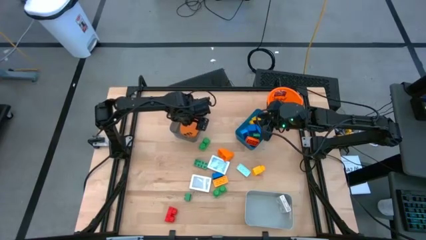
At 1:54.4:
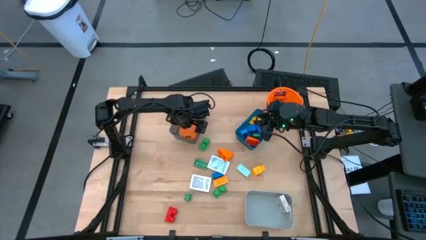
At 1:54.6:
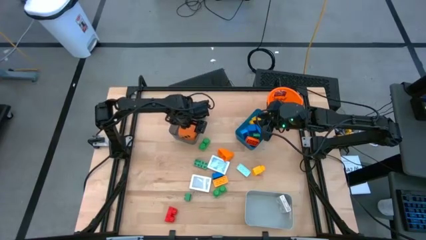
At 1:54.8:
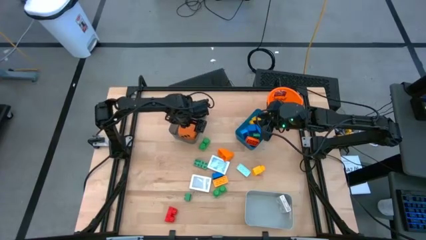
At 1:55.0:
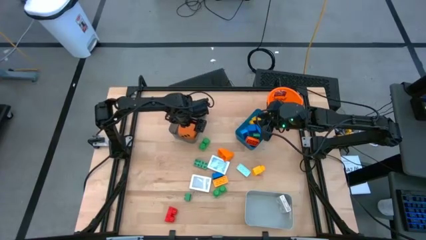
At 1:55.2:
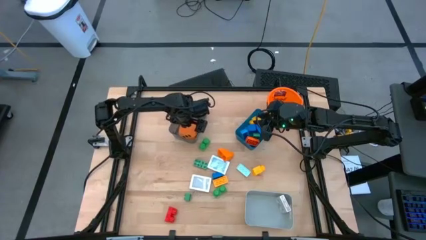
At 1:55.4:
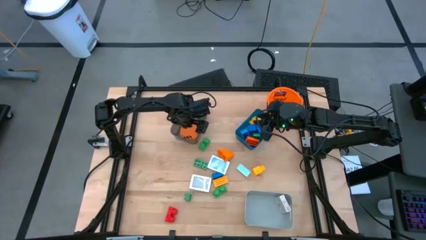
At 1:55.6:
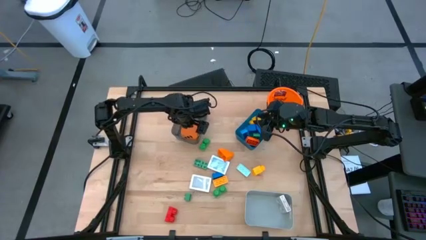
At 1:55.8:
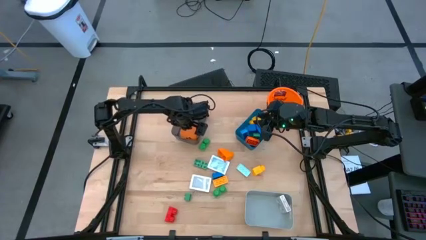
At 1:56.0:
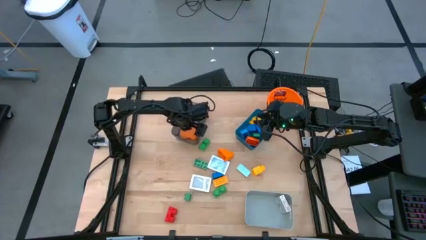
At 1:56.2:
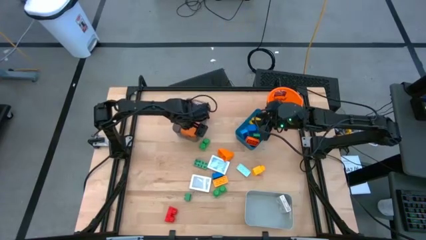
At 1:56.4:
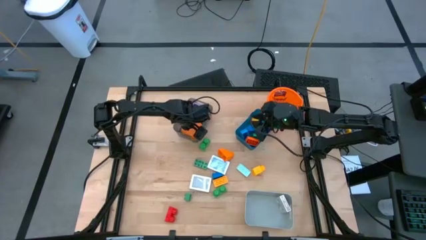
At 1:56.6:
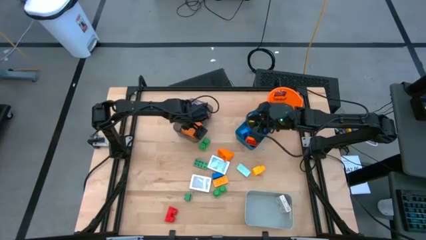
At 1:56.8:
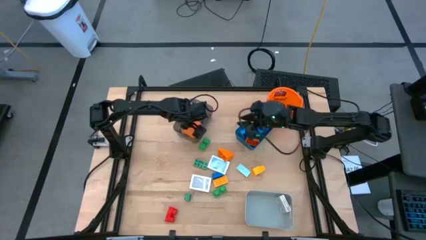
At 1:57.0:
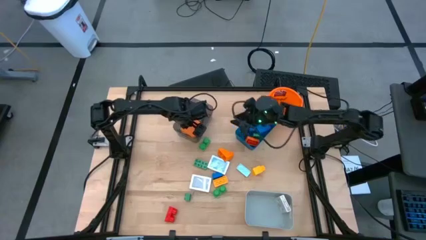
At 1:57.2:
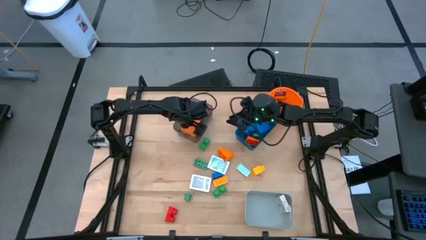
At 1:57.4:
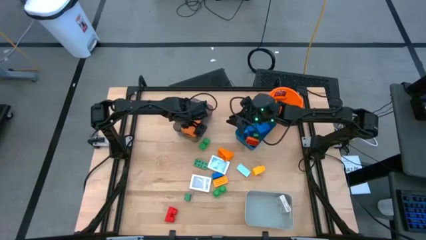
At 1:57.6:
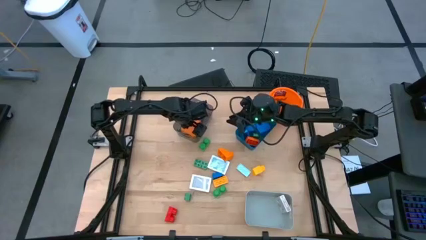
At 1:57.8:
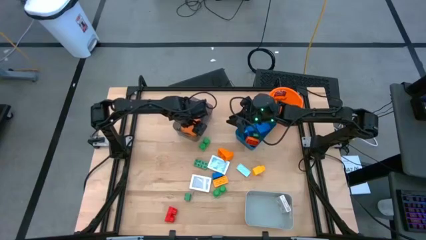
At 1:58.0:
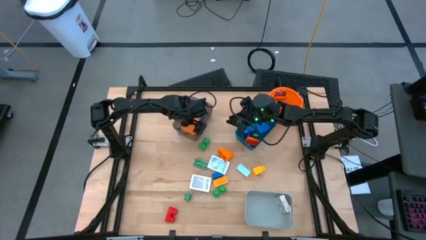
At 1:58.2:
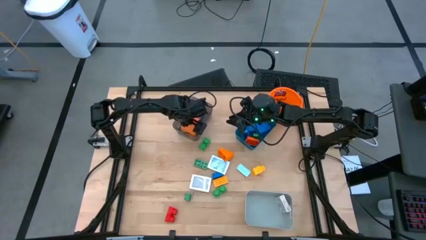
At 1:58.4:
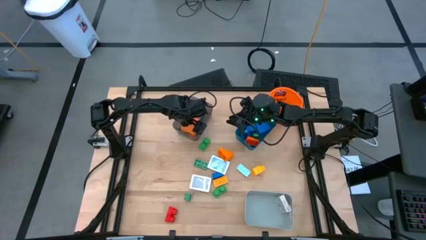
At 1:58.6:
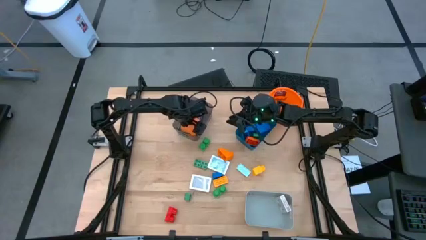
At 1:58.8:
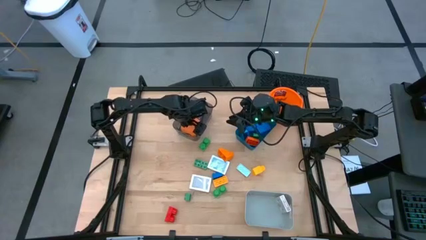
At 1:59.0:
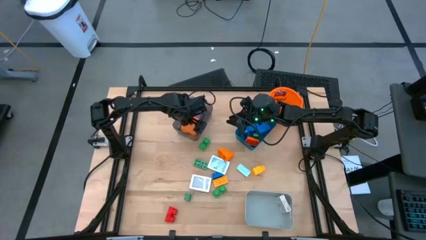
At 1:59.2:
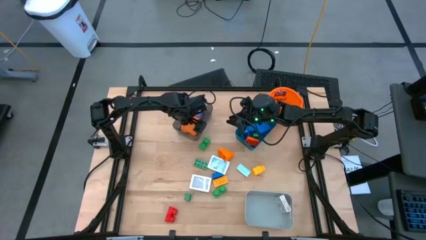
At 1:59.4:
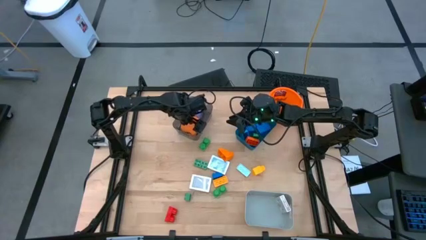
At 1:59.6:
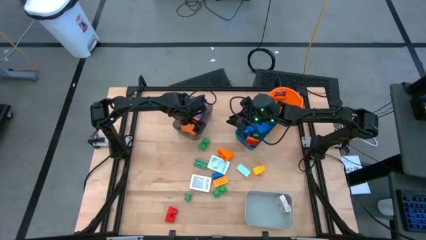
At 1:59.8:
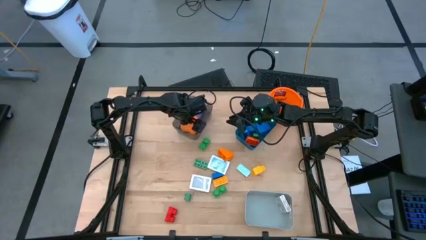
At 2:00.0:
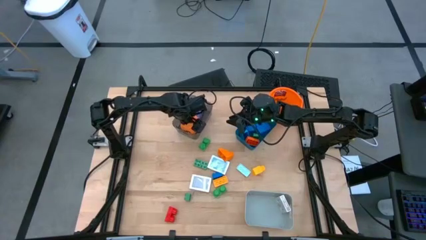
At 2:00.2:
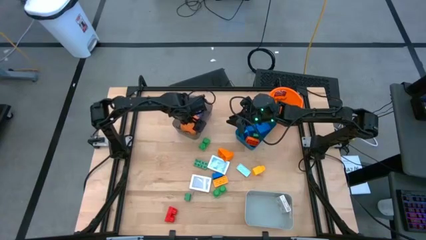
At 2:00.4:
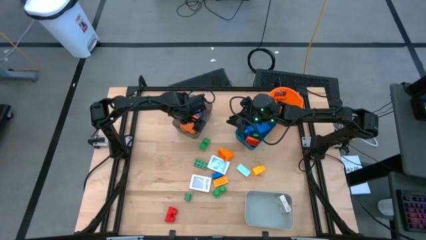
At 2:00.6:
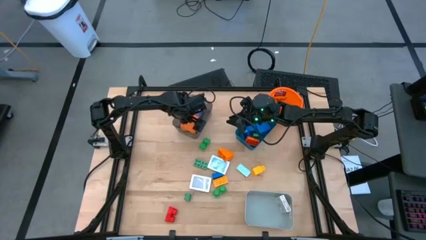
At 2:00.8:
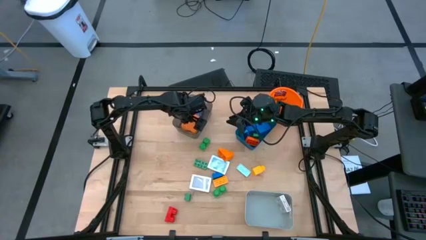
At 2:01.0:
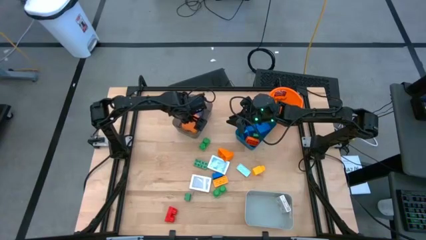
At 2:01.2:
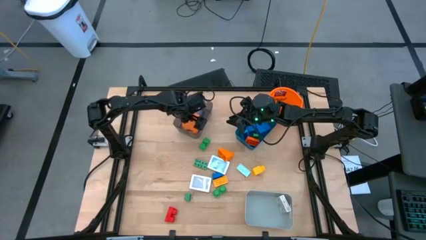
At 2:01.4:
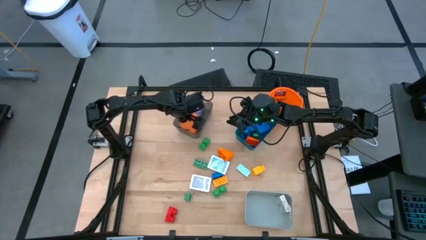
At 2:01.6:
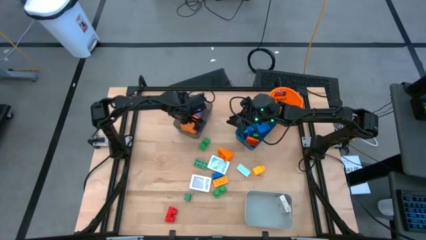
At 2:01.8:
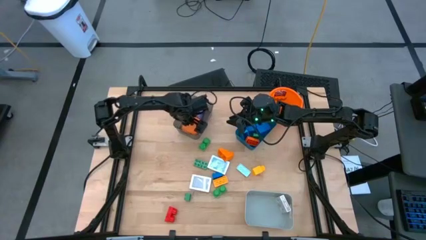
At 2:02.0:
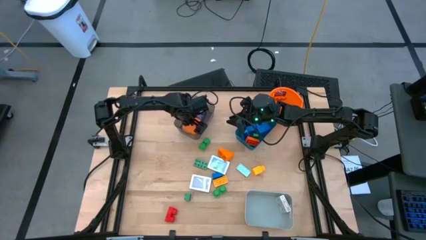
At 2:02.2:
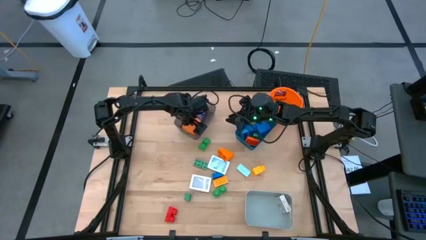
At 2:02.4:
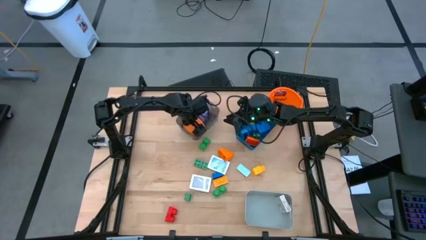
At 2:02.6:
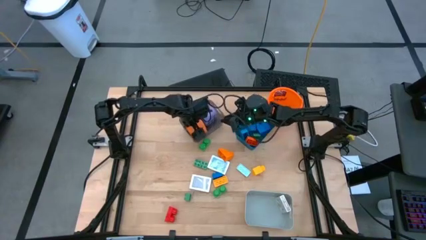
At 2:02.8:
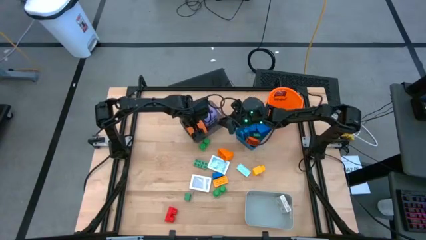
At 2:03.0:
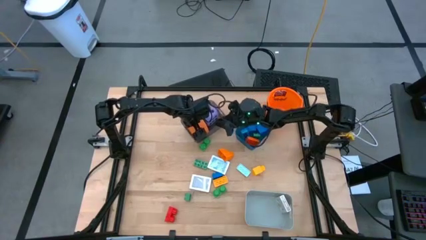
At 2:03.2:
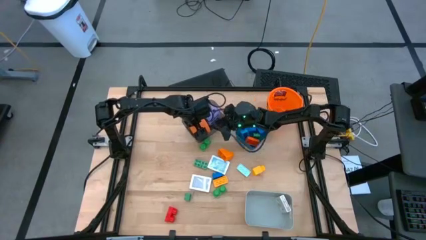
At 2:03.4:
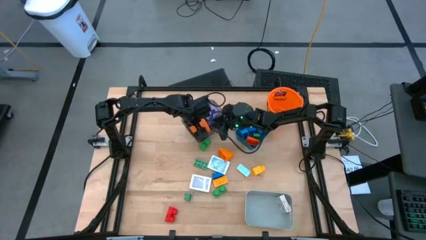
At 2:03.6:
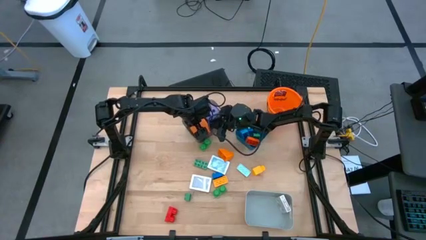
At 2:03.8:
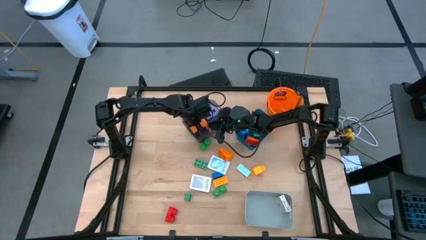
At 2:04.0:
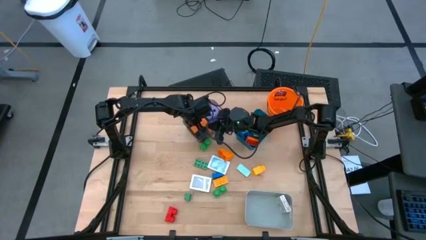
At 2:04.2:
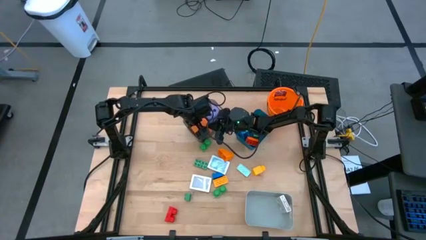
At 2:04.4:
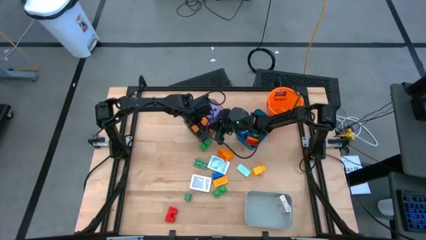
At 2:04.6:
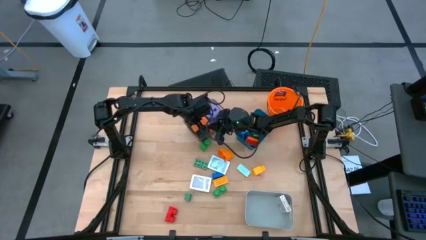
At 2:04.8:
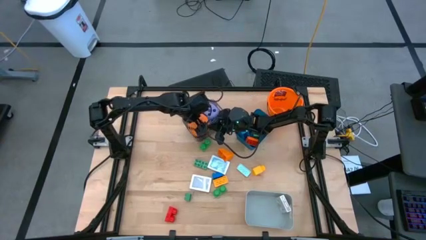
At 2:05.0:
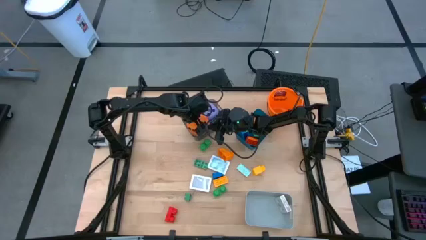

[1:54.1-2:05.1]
Task: Pick & Place Toys
Put the orange dice into the black bin

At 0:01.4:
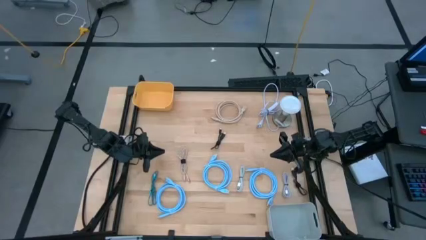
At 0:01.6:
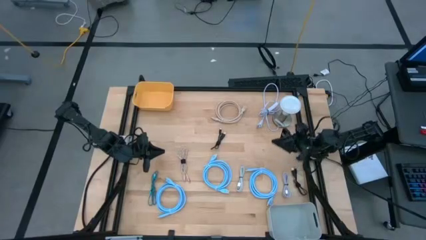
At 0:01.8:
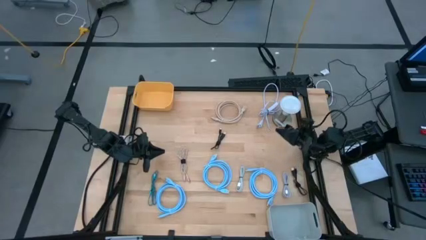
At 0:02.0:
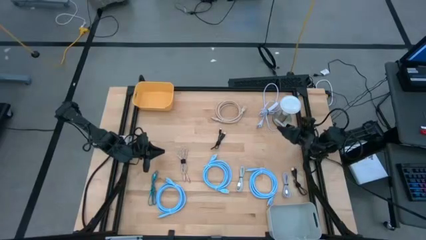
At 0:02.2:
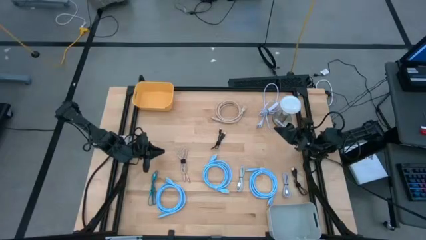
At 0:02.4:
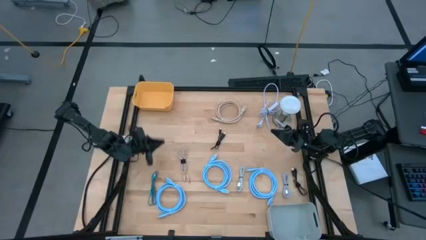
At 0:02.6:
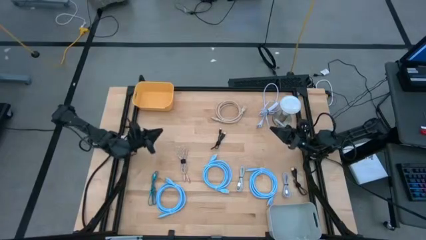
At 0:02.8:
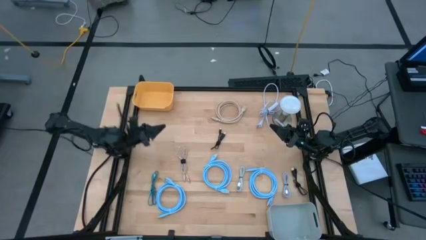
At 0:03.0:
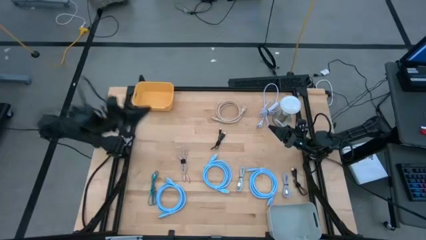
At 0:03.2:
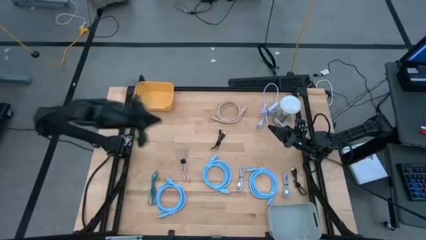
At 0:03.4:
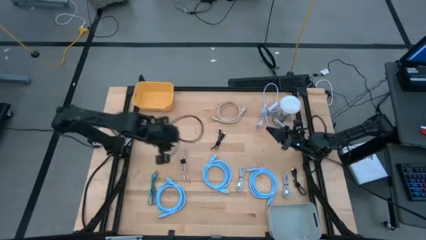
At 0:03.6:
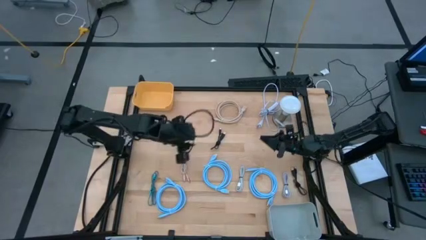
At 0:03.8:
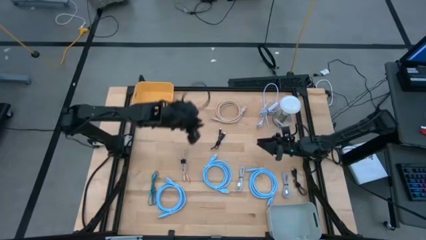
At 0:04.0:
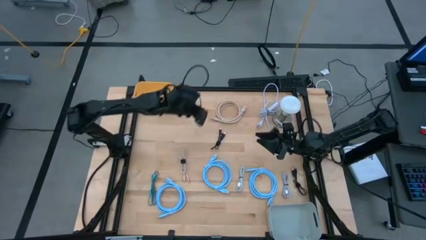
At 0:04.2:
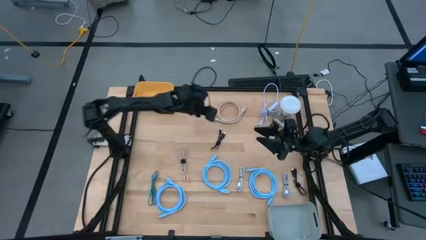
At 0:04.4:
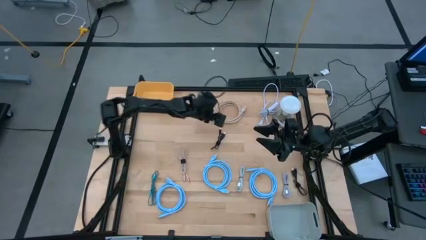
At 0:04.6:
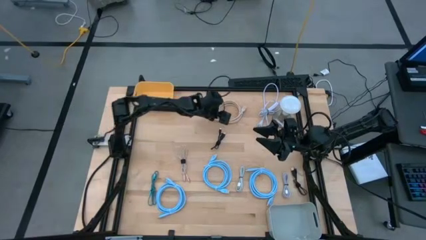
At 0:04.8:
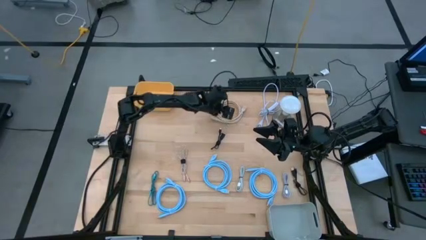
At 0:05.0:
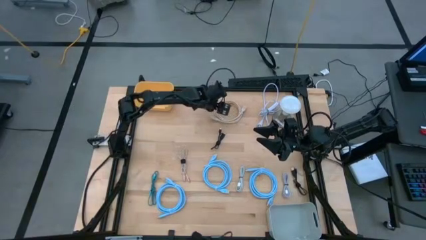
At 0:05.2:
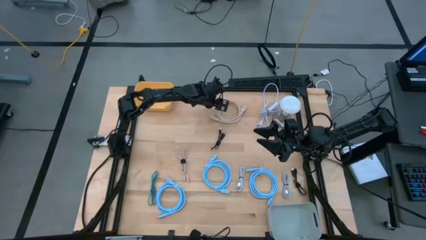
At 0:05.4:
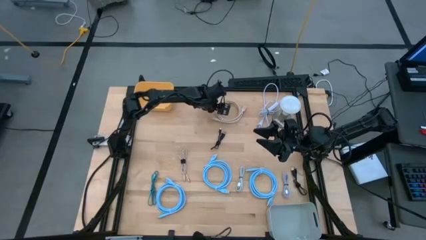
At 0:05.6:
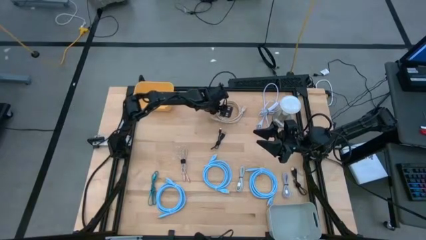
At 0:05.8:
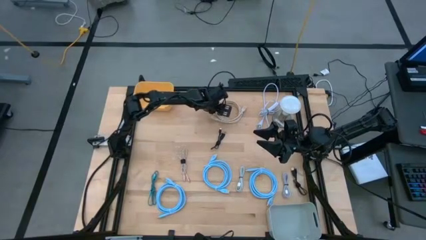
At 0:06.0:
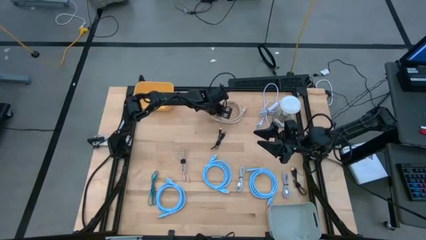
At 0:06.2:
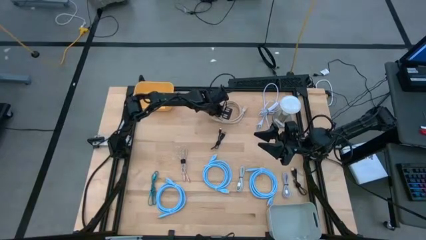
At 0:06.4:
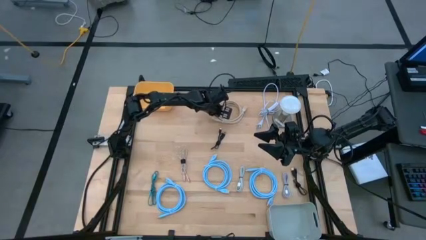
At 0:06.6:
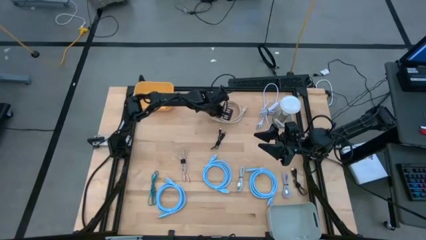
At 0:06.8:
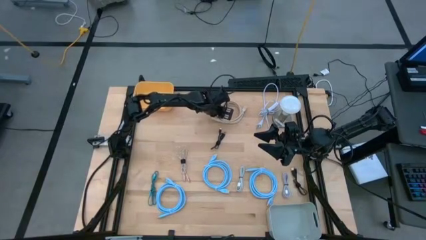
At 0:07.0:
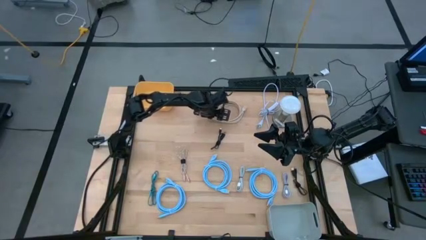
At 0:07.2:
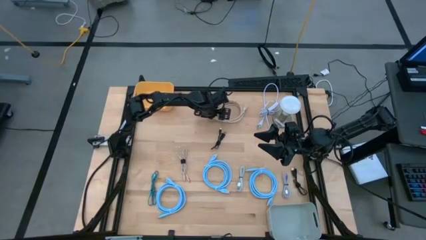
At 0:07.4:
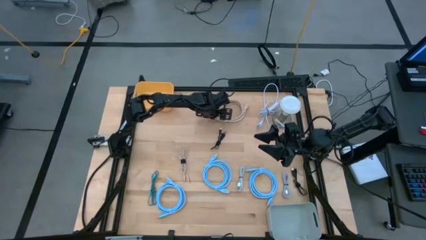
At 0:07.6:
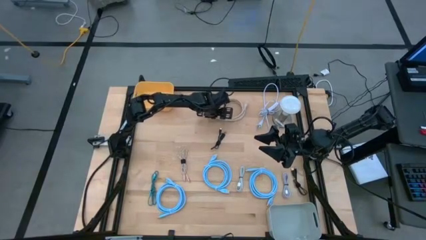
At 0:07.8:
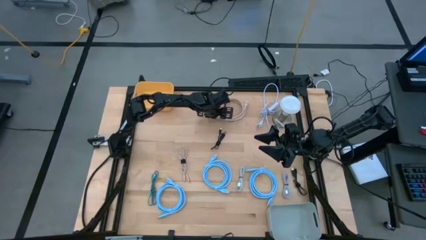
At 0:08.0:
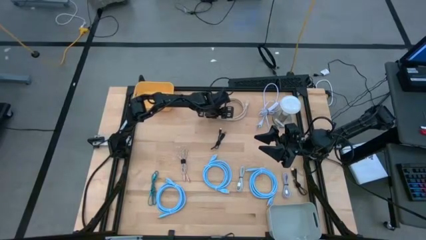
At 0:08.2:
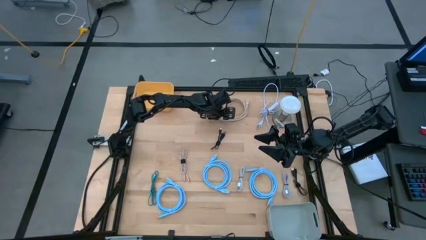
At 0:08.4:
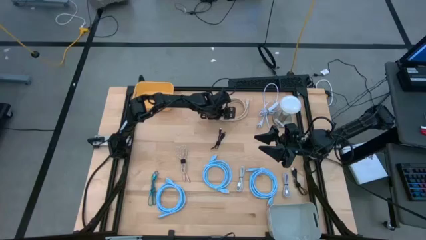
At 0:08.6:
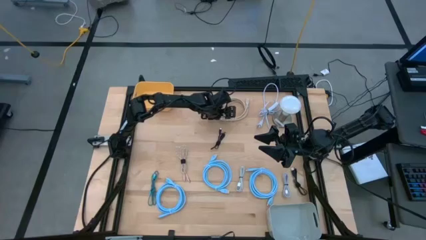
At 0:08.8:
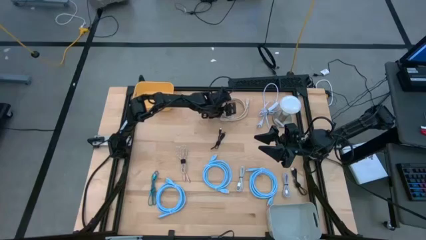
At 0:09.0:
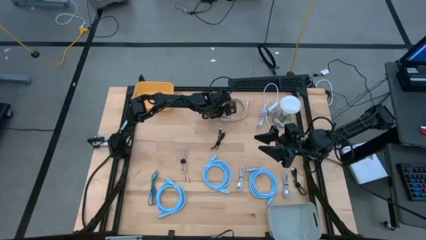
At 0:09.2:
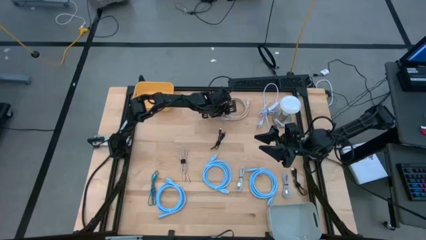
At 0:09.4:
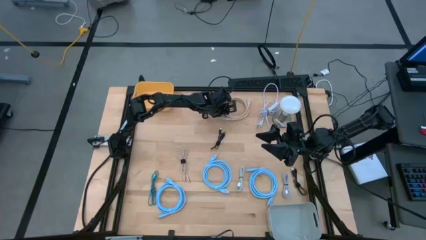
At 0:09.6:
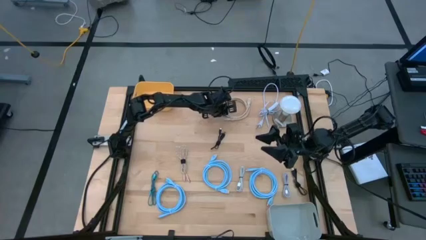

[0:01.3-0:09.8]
Task: Pick & Place USB Port
Put the gray hdmi cable into the yellow bin
